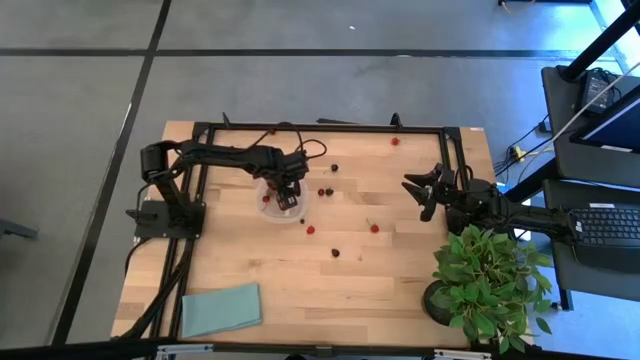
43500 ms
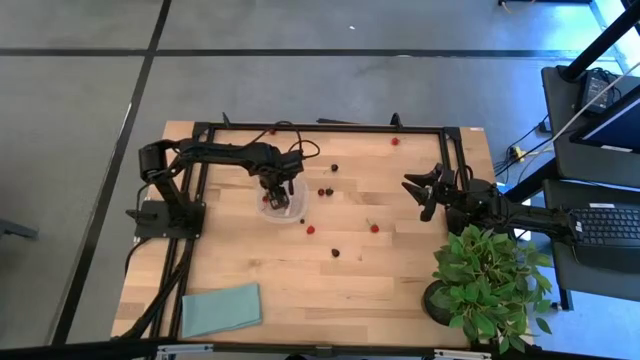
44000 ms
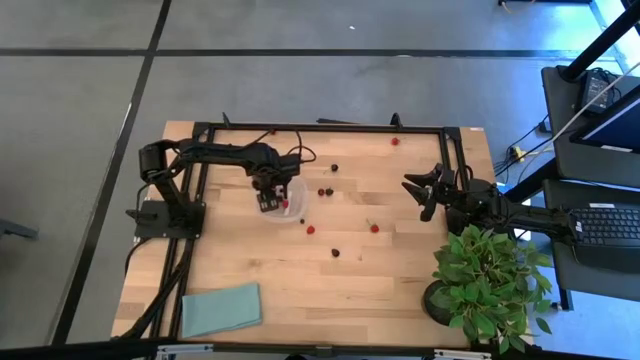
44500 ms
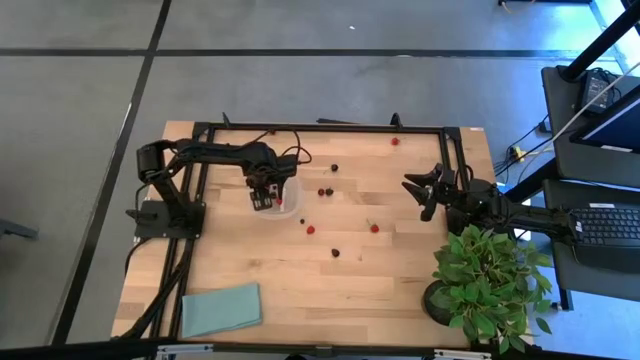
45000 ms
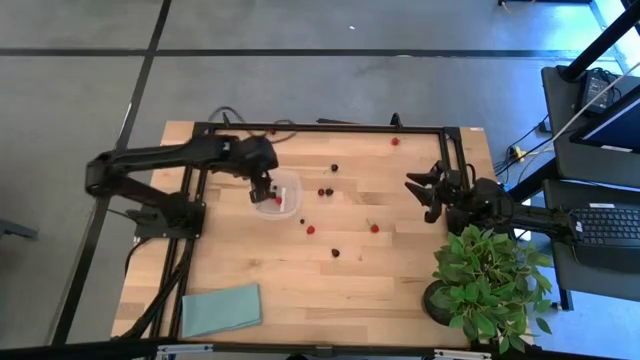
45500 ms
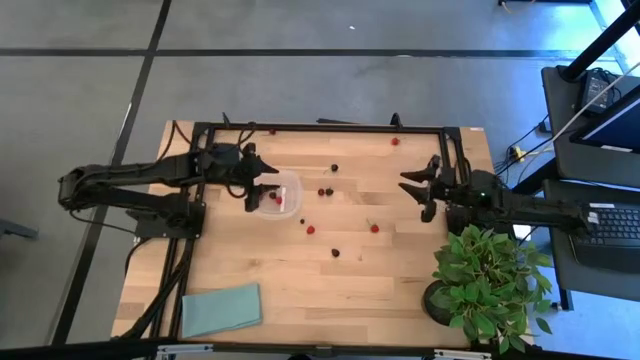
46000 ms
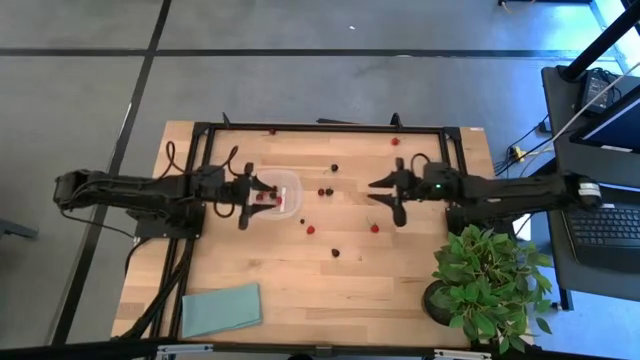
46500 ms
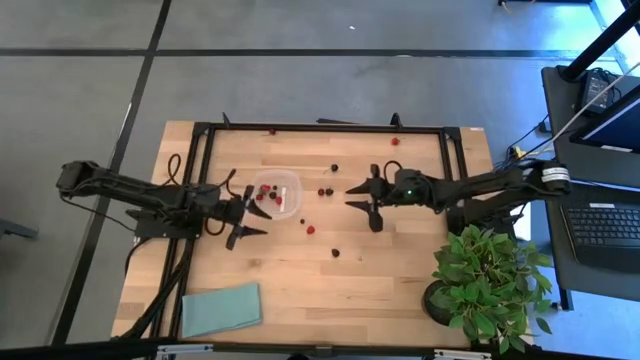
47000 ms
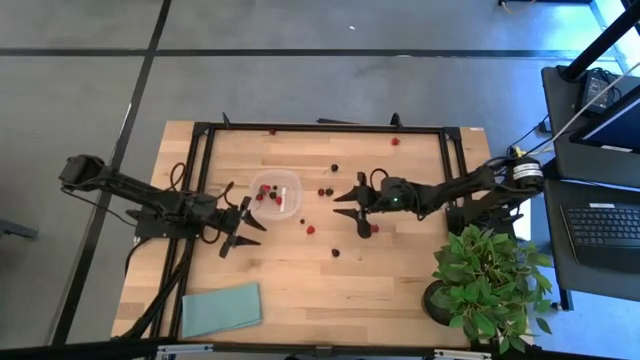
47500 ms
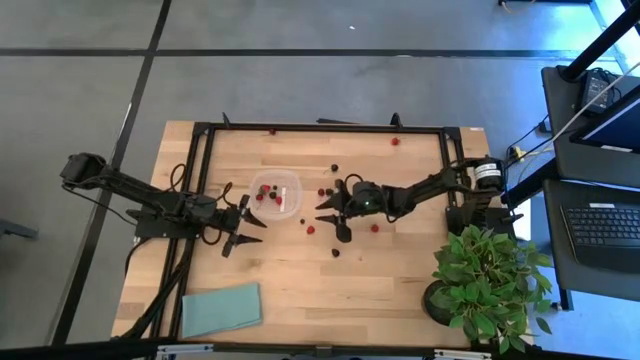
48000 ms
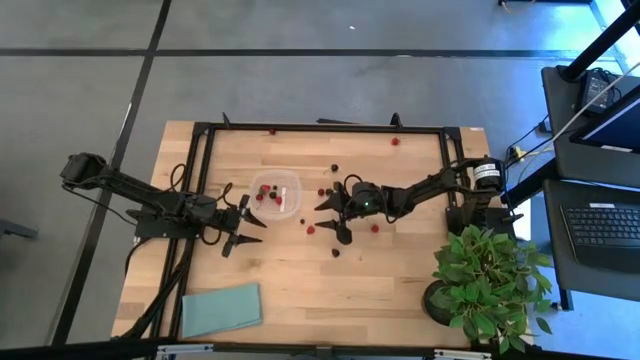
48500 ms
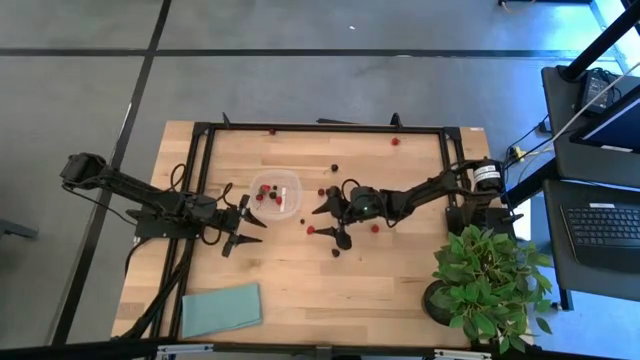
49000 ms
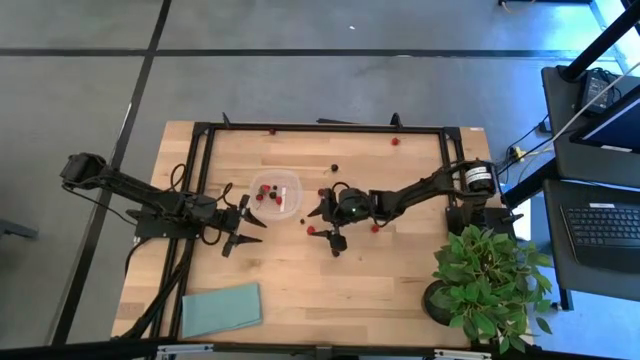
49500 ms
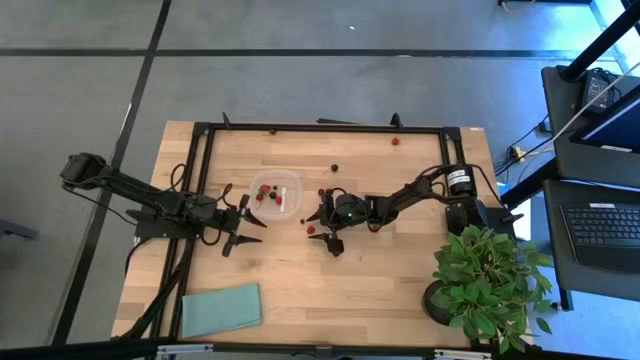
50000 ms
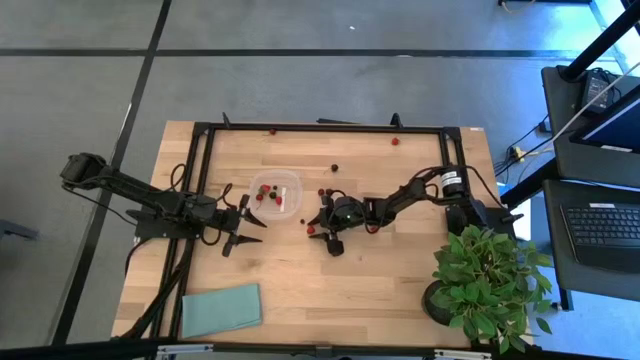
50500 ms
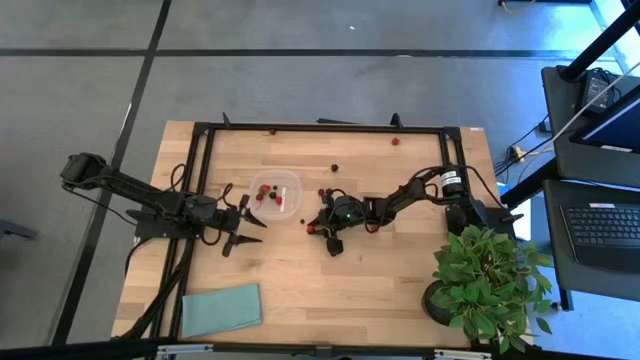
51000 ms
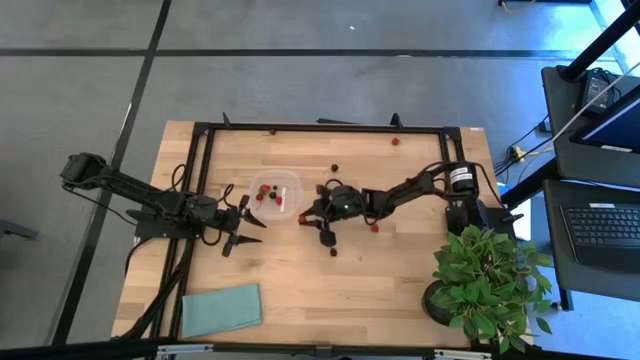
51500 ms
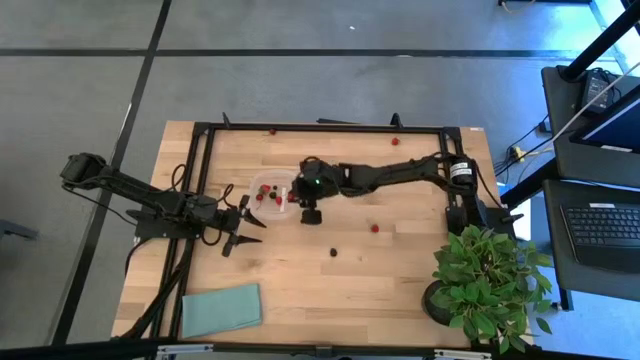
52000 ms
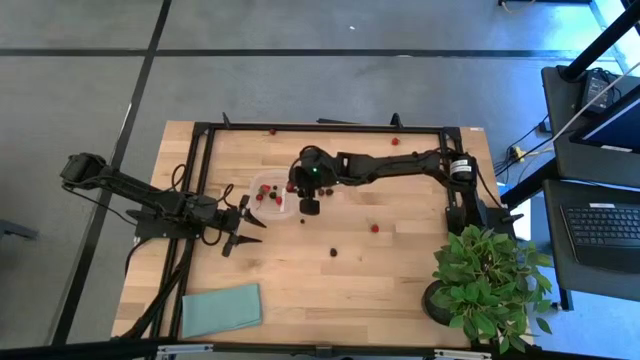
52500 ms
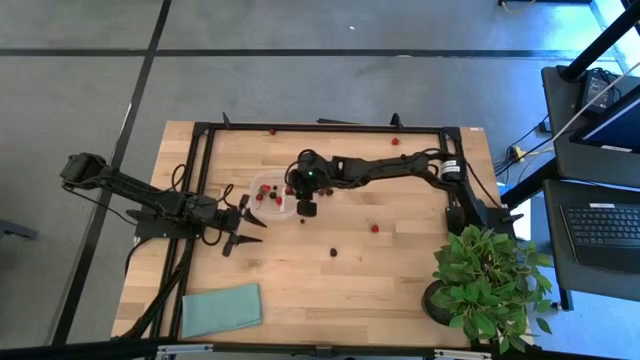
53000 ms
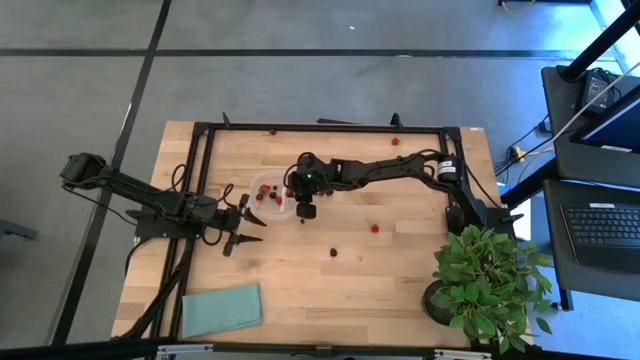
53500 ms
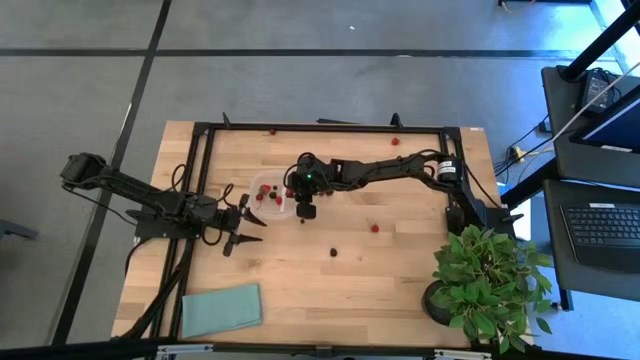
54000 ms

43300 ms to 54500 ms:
Task: Pick and placing Produce into tupperware
Put the raspberry into the transparent container

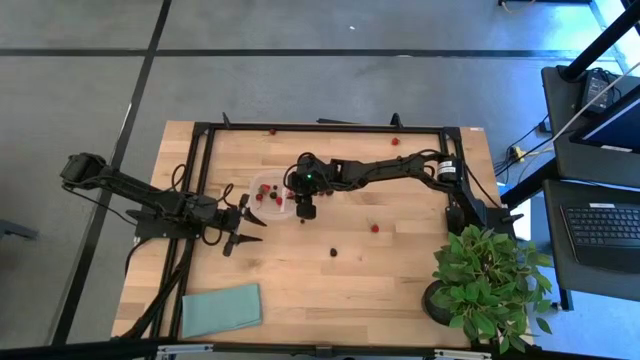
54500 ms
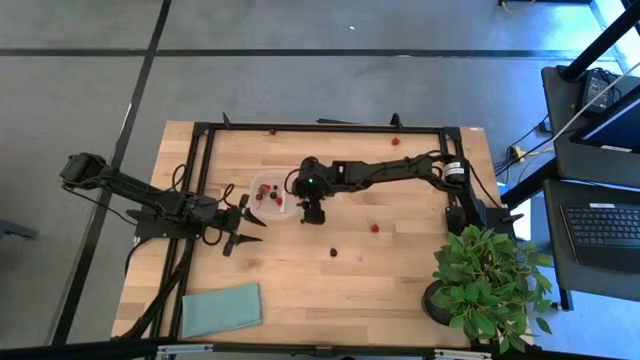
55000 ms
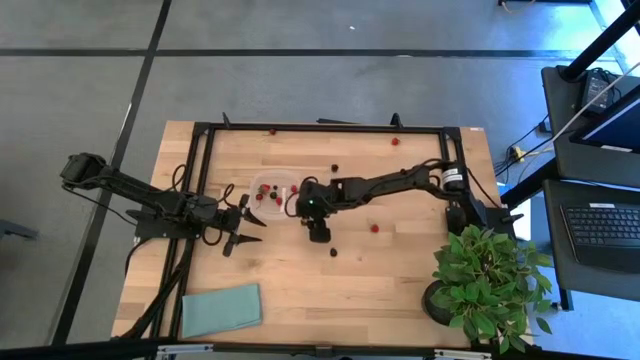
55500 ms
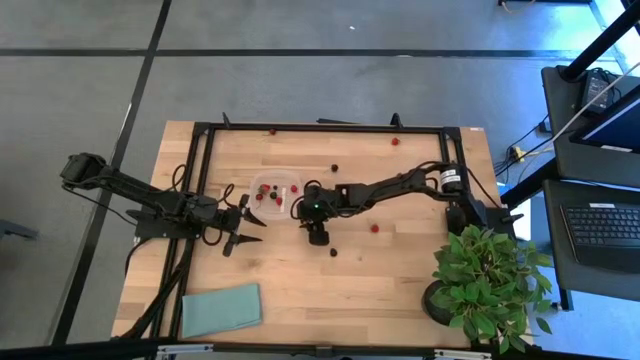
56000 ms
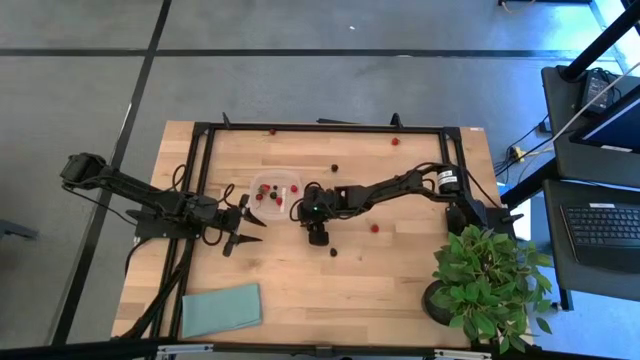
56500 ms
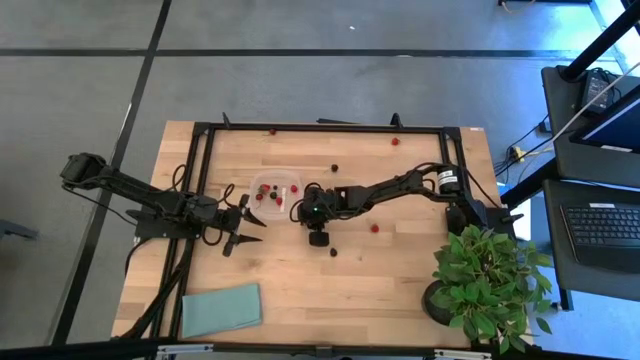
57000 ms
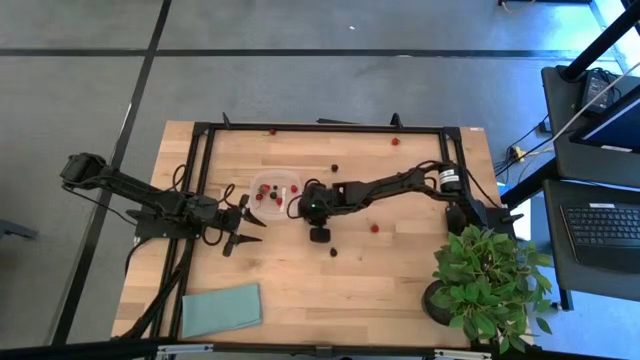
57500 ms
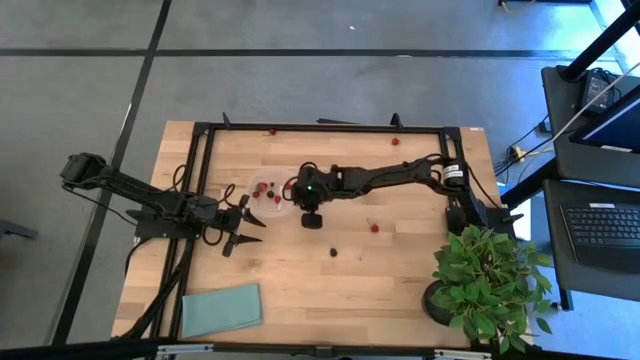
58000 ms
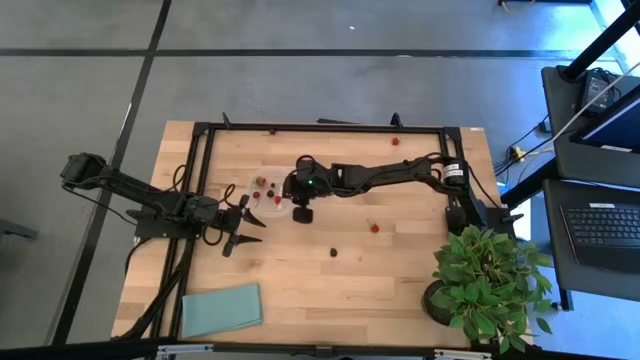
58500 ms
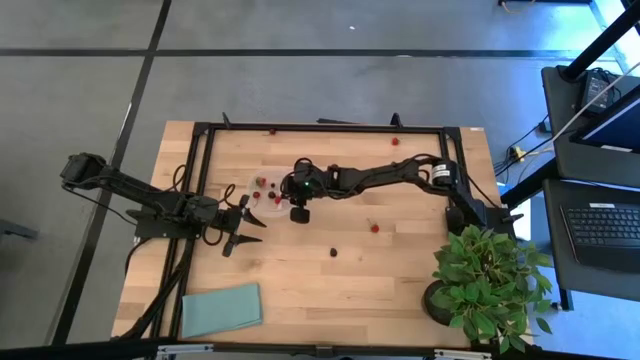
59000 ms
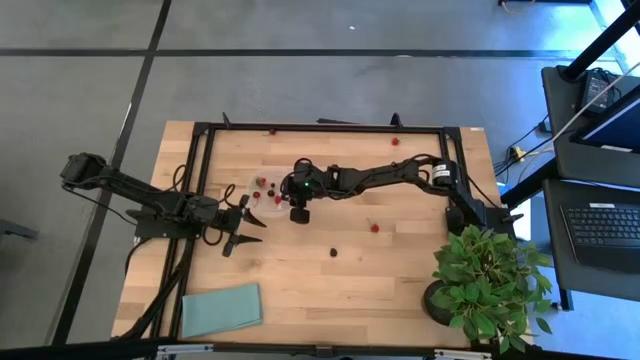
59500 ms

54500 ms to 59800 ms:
Put the blueberry into the transparent container

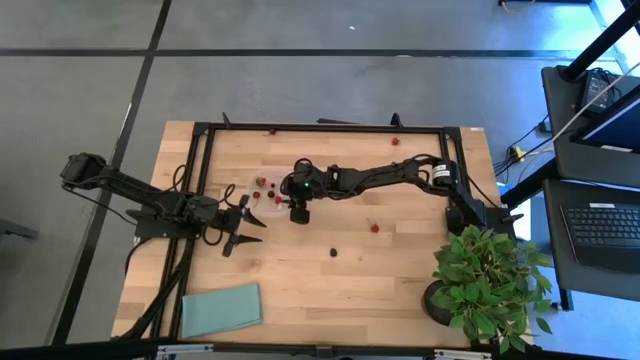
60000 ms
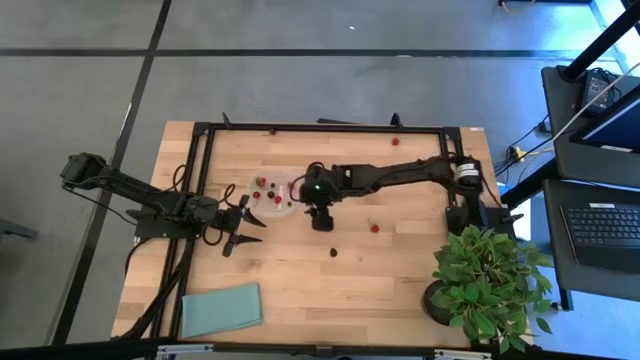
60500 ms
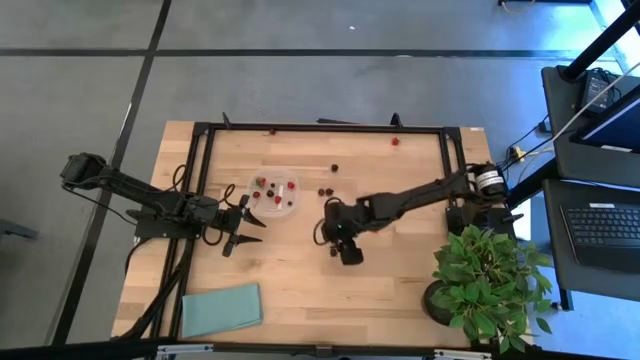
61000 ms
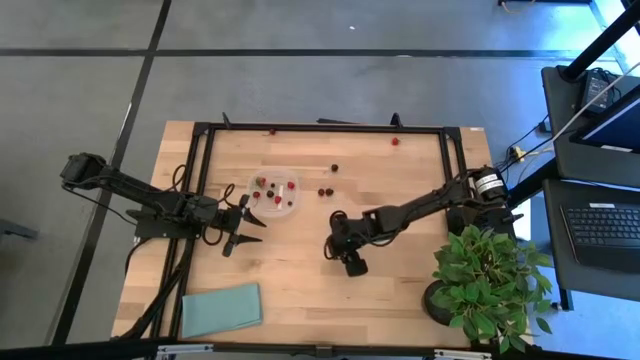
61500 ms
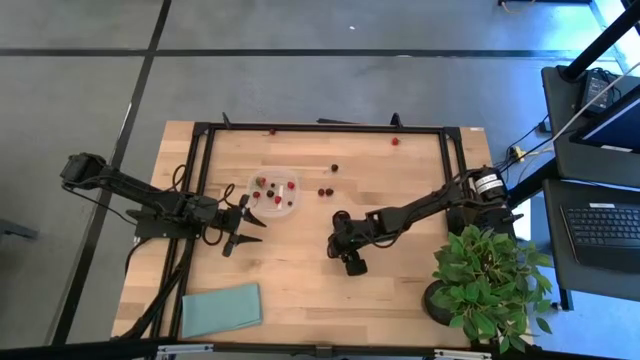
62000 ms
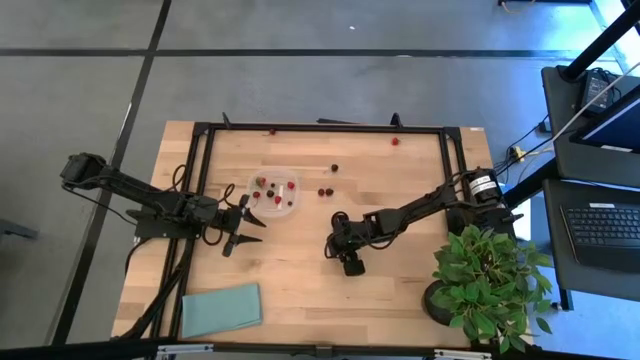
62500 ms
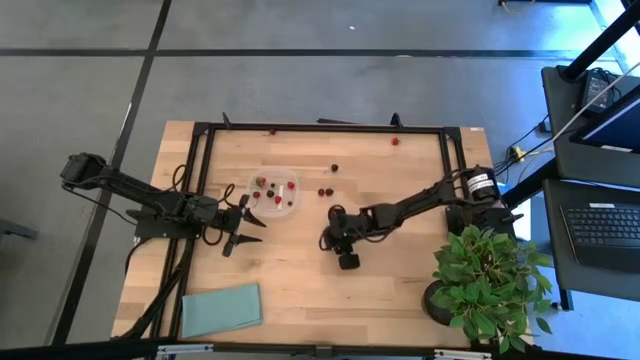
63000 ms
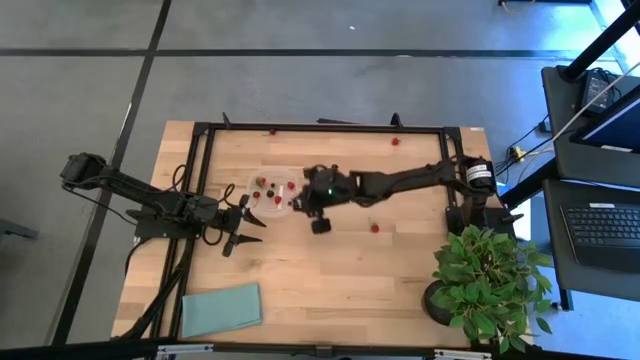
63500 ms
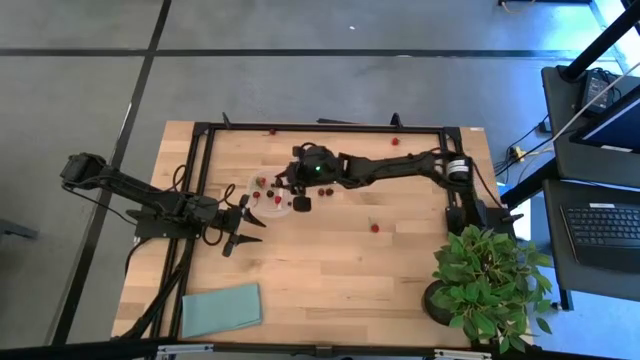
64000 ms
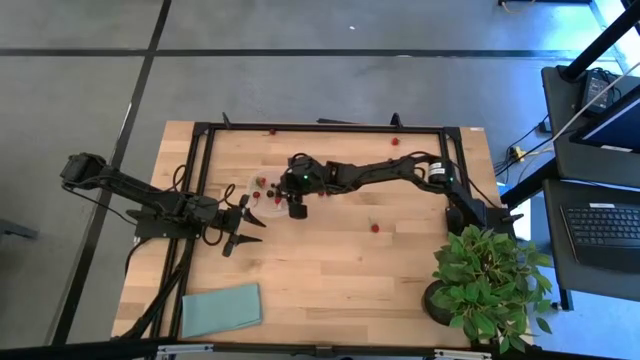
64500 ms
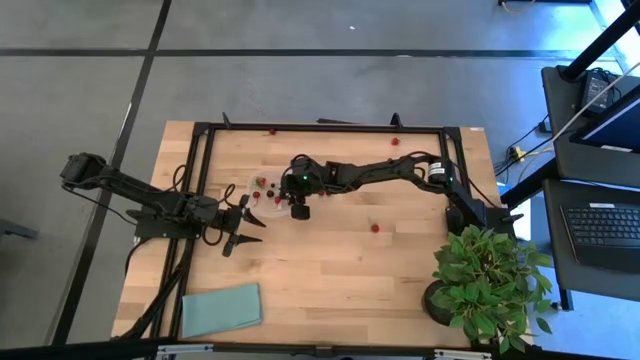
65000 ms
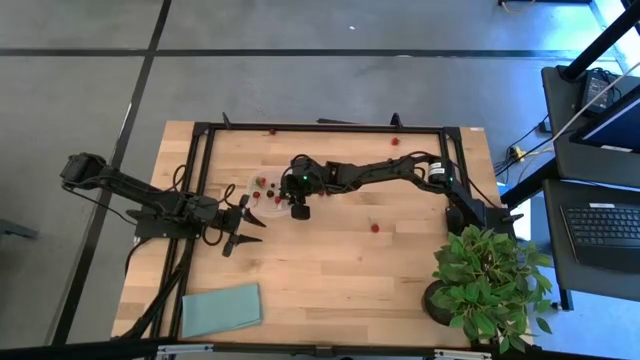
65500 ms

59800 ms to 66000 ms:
Put the bottom blackberry into the transparent container
